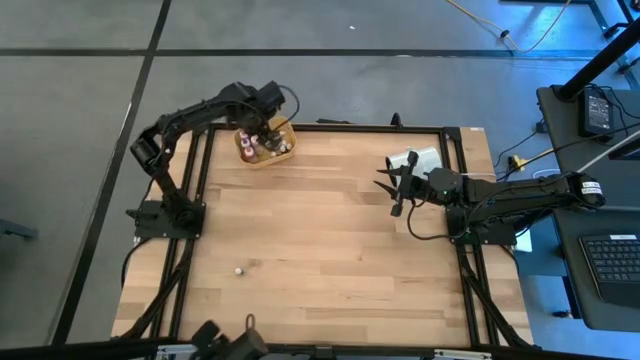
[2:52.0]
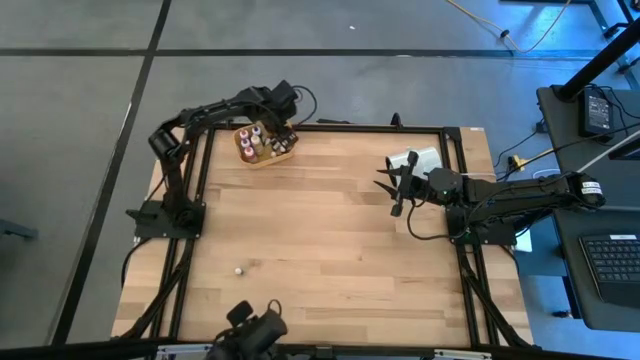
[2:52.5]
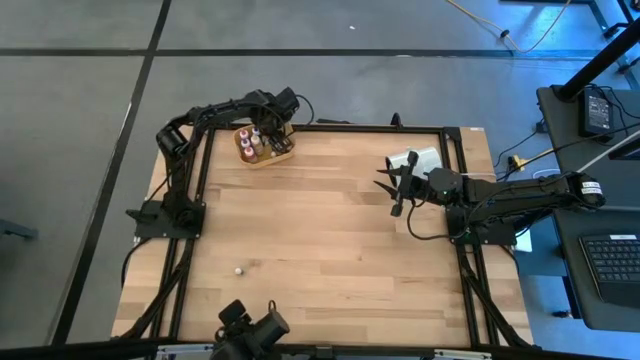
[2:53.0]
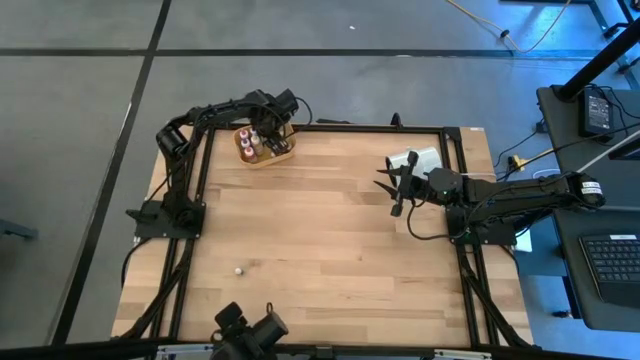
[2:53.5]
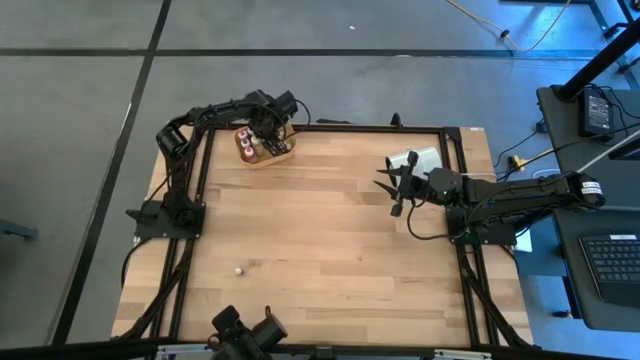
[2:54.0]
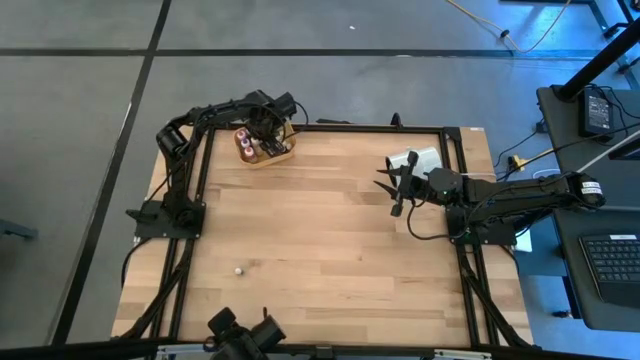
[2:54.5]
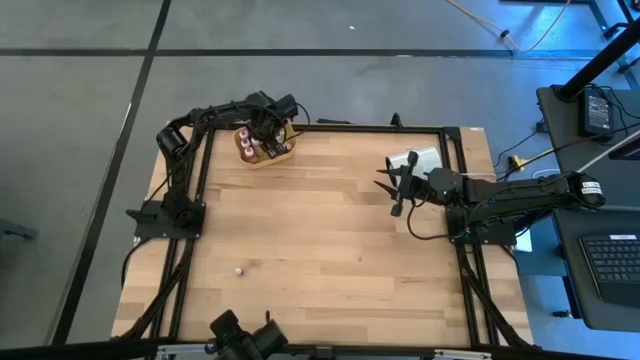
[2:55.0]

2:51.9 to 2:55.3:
Task: Pick & Place food coloring
Adjust the large blue food coloring bottle on the yellow bin

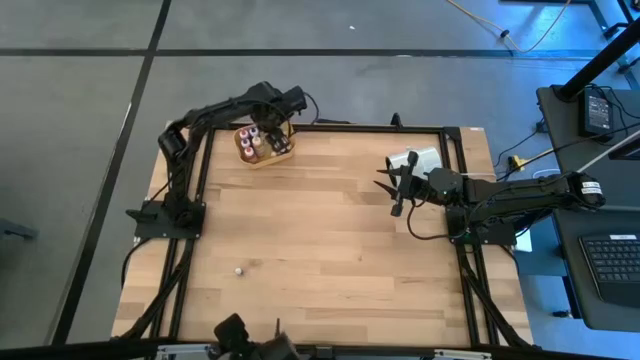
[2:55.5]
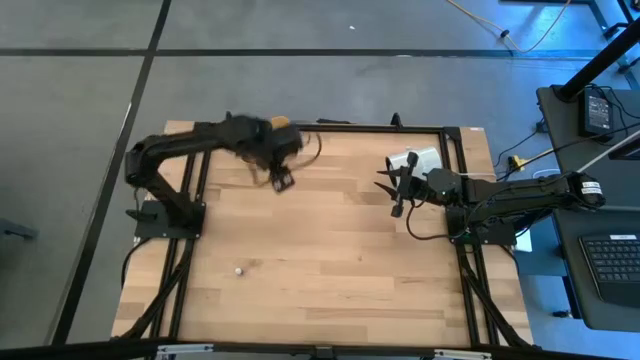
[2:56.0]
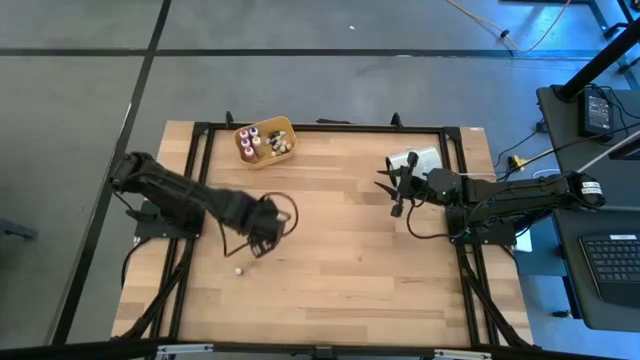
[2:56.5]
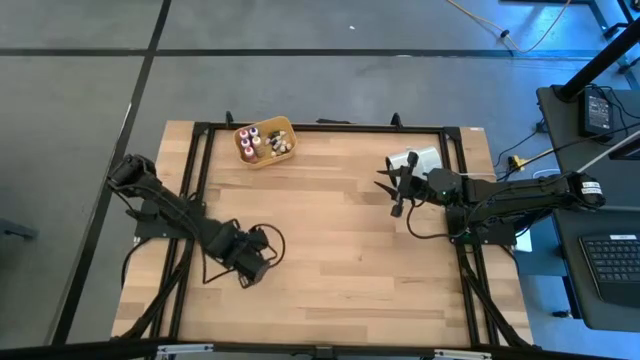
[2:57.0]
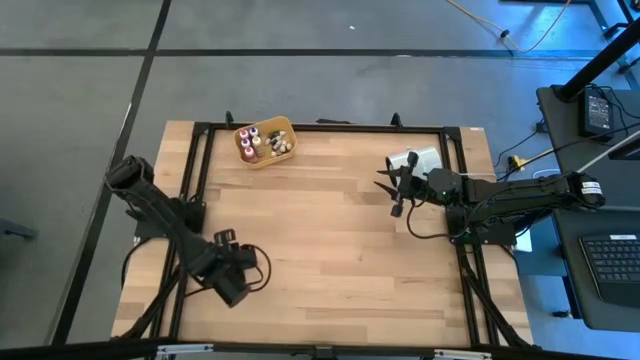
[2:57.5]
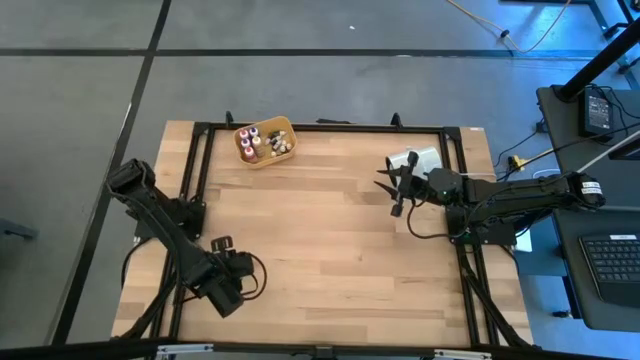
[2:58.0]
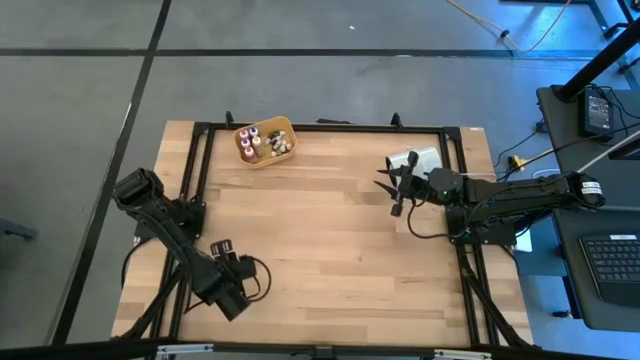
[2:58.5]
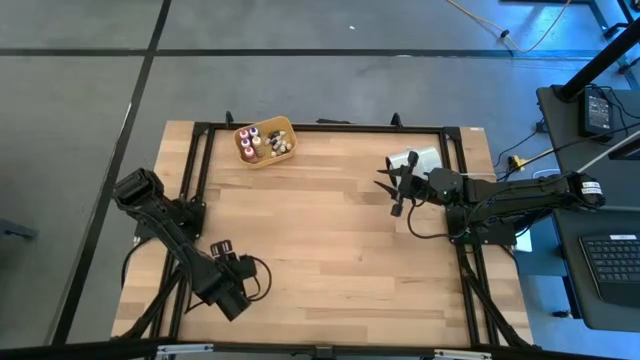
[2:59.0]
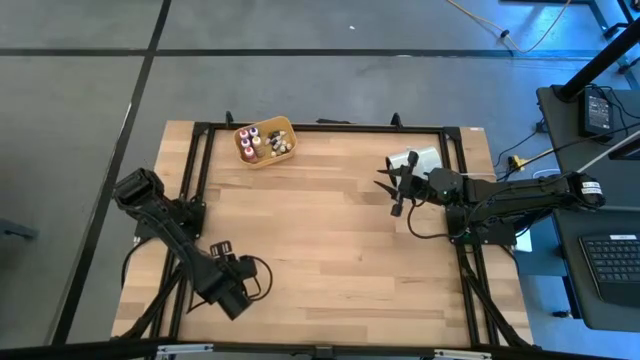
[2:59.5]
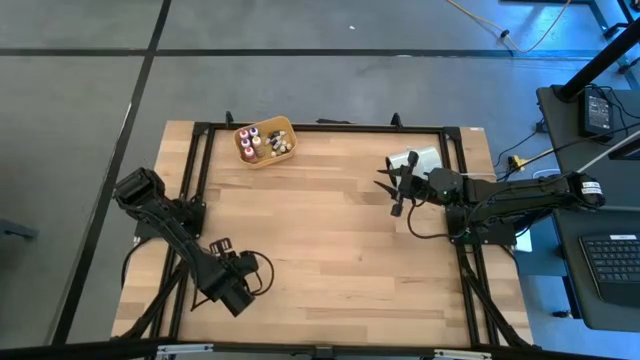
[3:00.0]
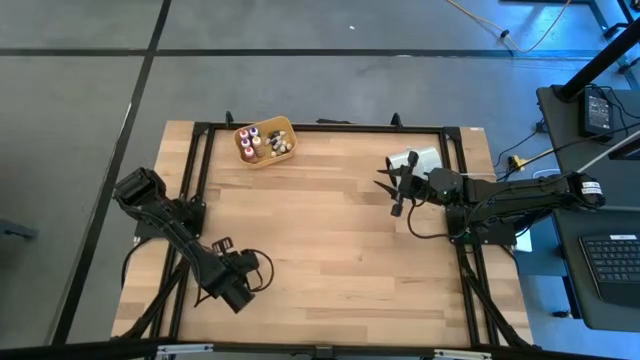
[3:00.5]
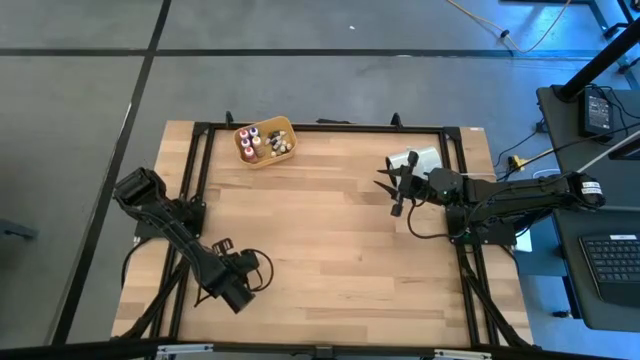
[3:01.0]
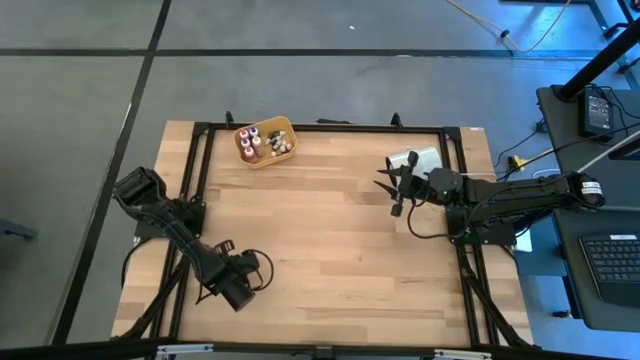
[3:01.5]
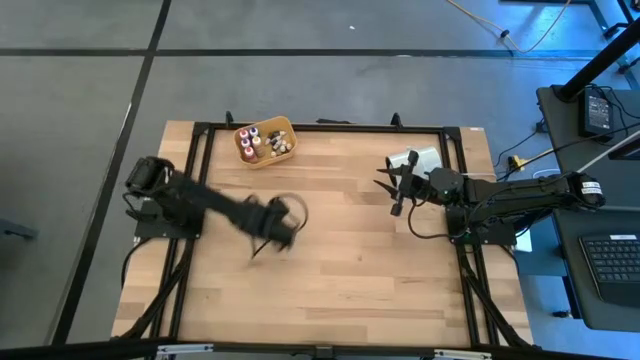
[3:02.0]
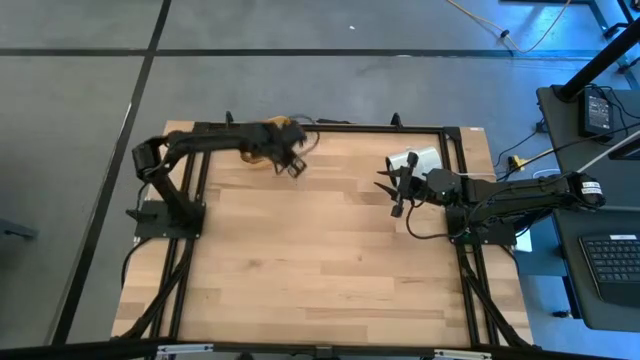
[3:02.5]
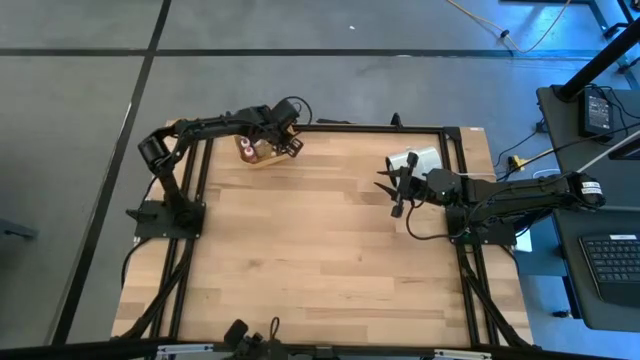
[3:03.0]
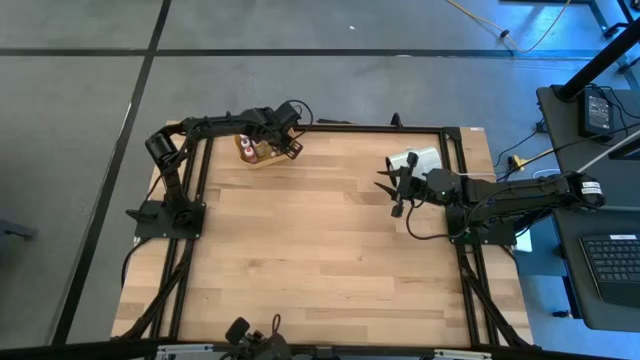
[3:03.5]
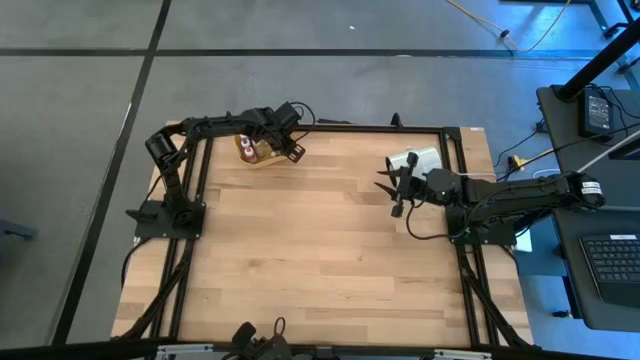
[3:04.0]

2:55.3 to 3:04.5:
Put the small black food coloring bottle into the yellow bin

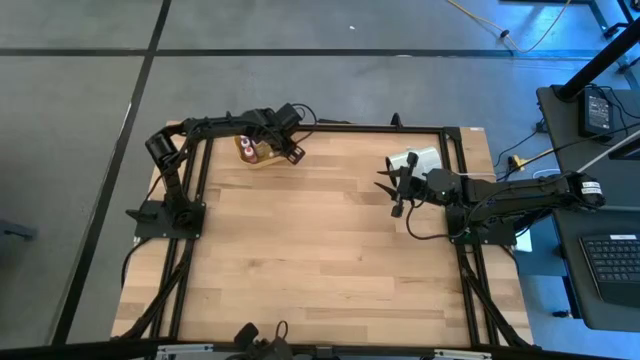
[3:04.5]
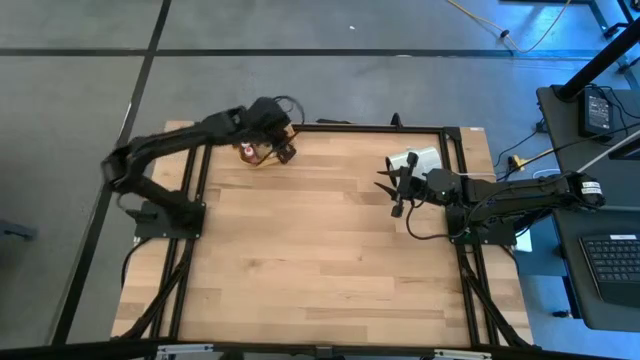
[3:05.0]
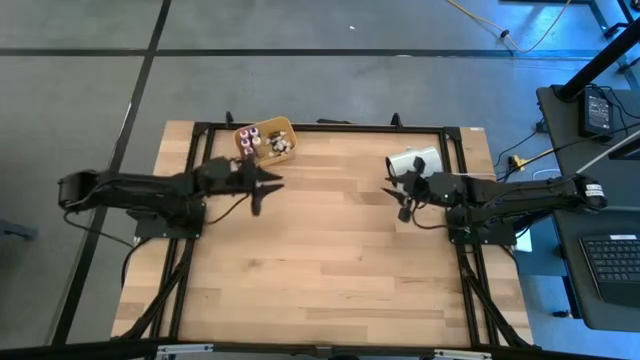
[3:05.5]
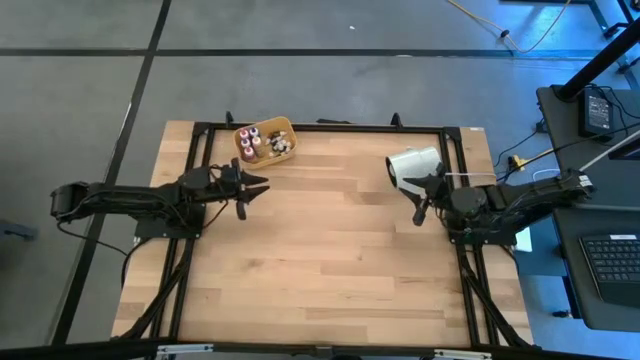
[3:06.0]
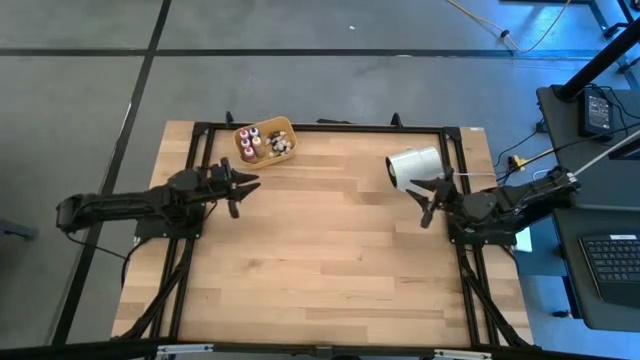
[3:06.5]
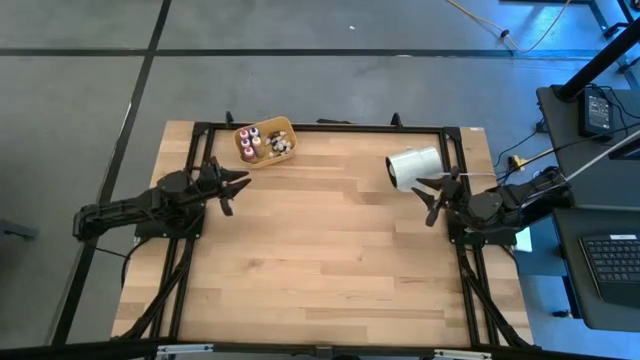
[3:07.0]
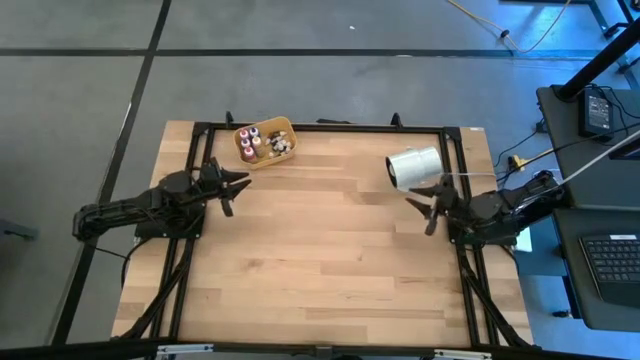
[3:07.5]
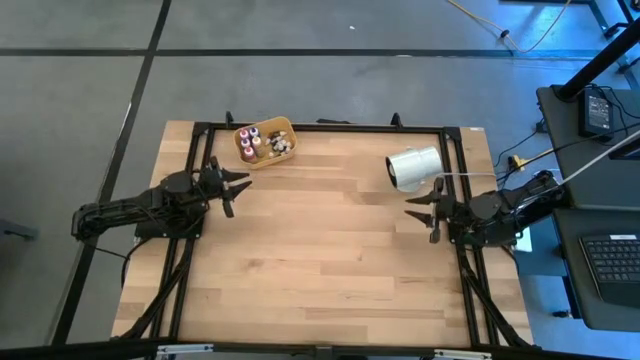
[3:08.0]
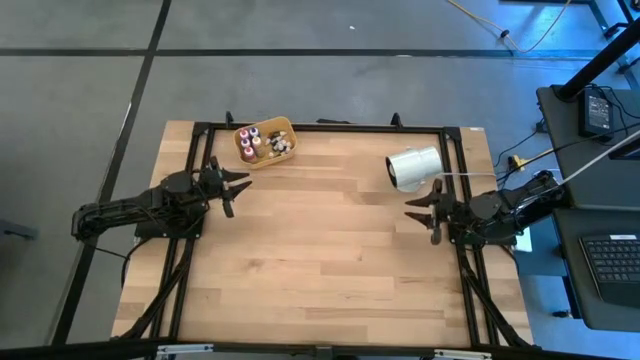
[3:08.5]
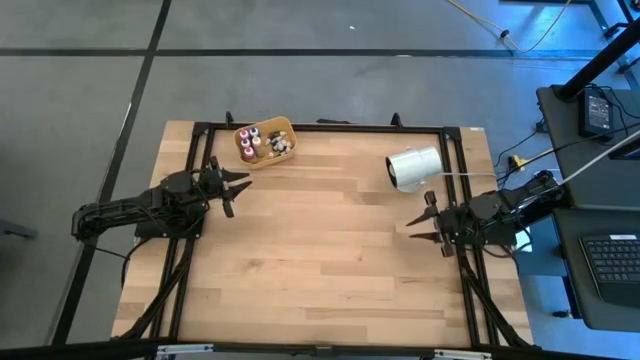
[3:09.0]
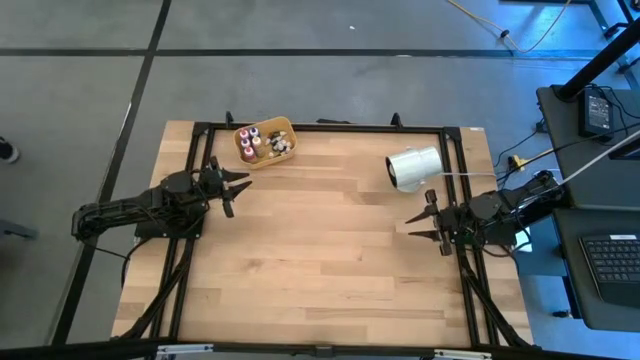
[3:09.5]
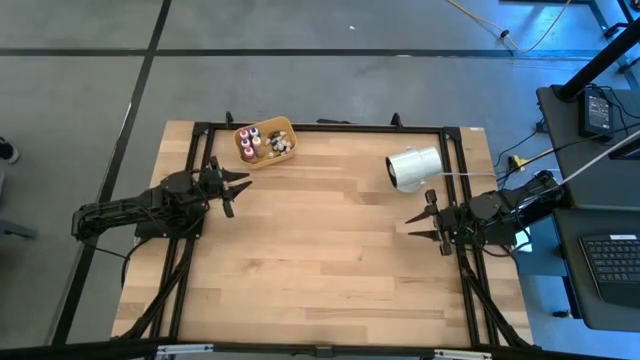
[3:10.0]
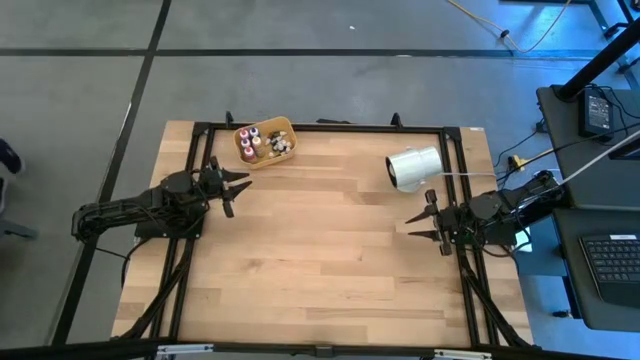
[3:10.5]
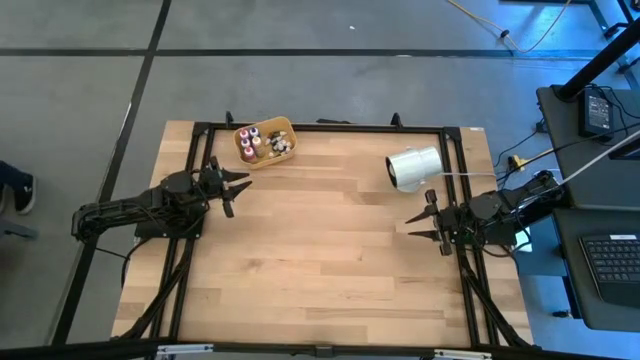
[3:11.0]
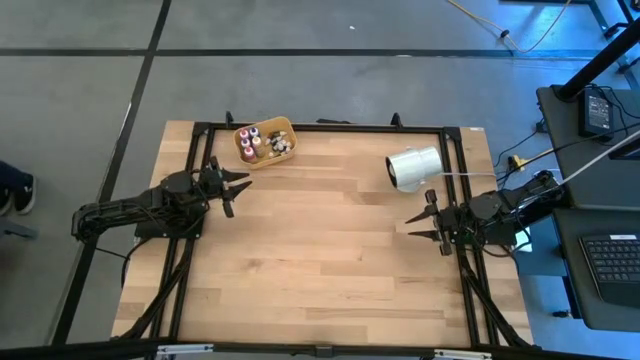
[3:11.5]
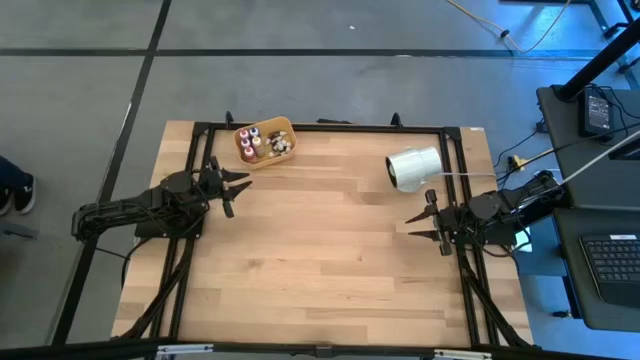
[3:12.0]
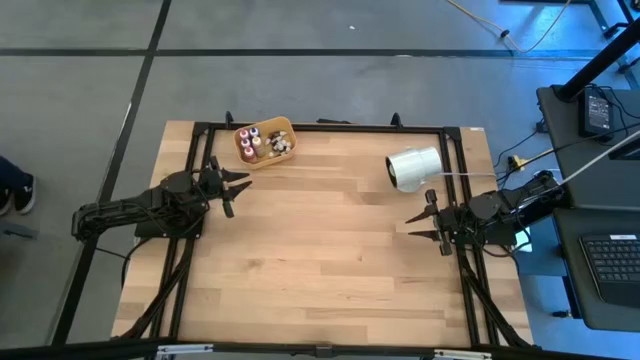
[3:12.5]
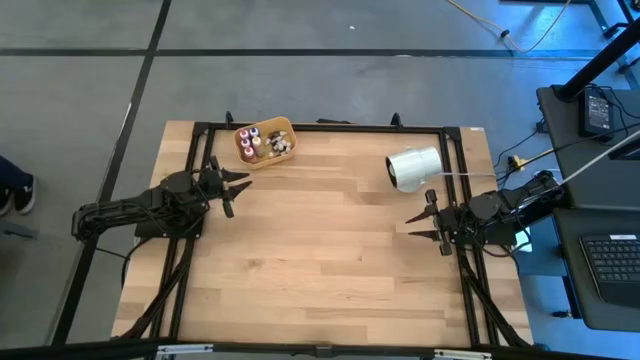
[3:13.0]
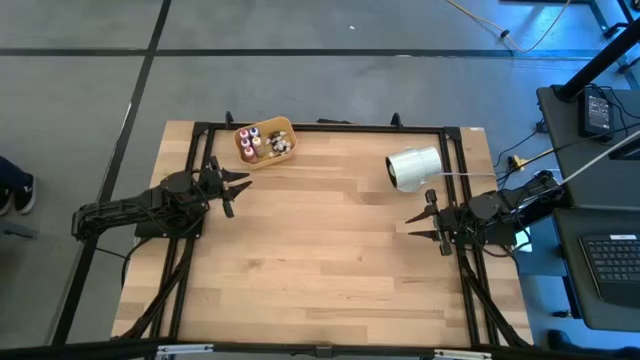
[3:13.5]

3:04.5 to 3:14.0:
Return to Home Position
